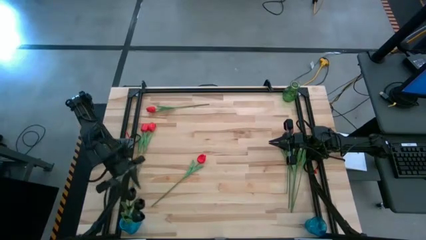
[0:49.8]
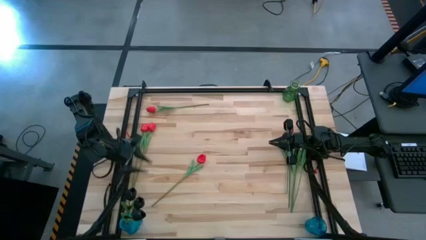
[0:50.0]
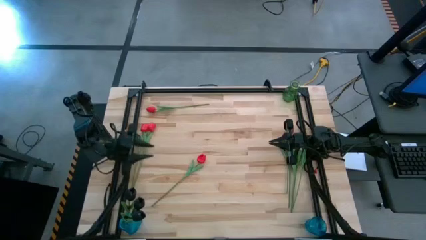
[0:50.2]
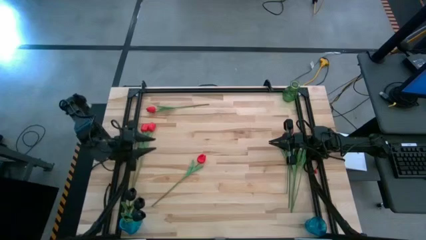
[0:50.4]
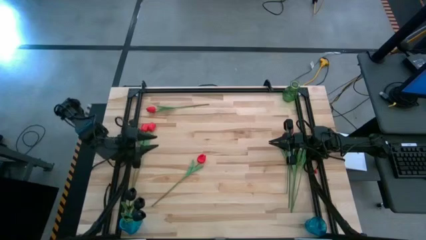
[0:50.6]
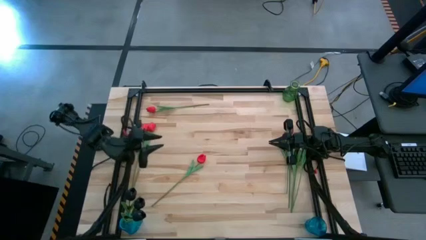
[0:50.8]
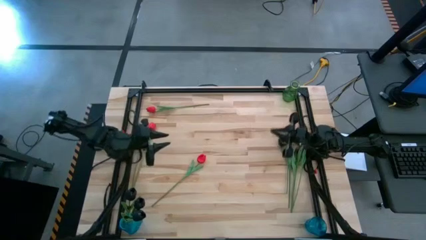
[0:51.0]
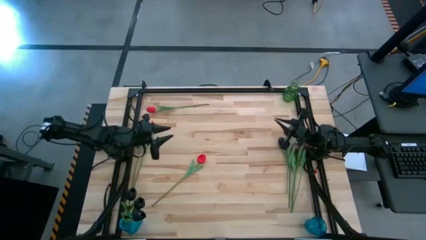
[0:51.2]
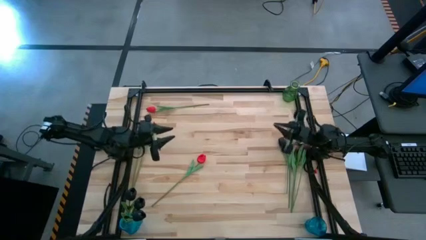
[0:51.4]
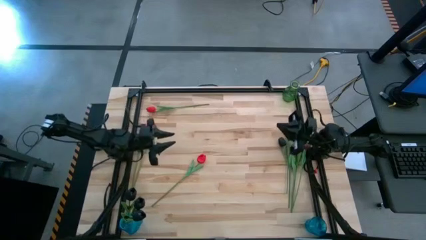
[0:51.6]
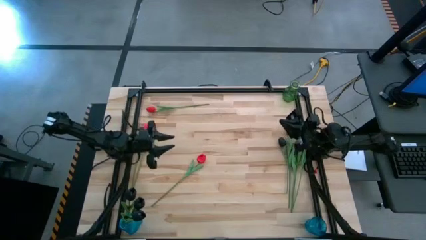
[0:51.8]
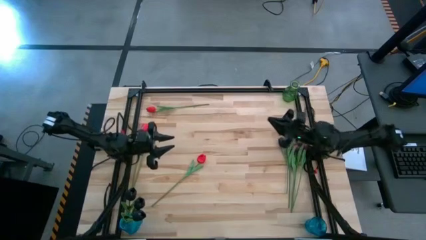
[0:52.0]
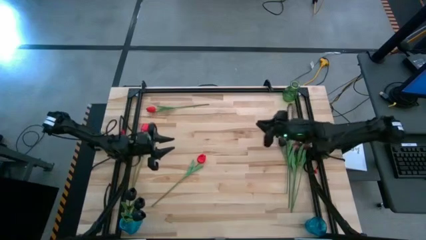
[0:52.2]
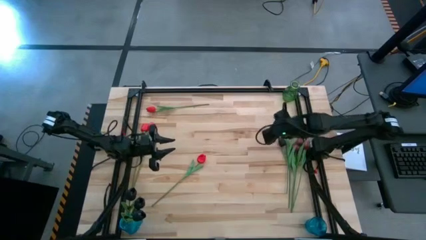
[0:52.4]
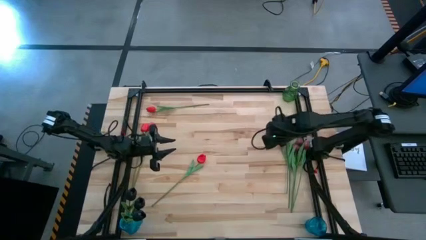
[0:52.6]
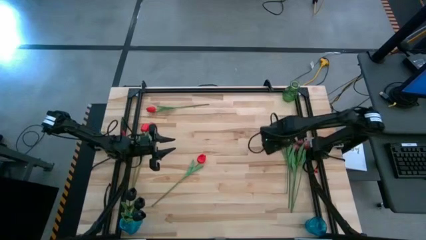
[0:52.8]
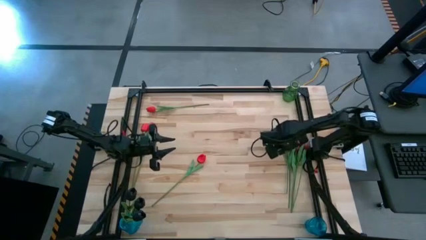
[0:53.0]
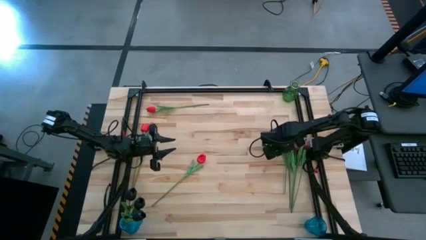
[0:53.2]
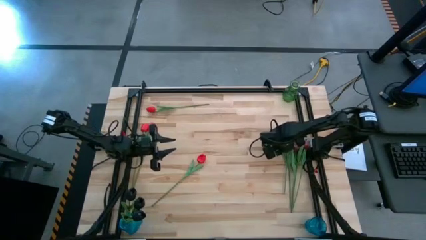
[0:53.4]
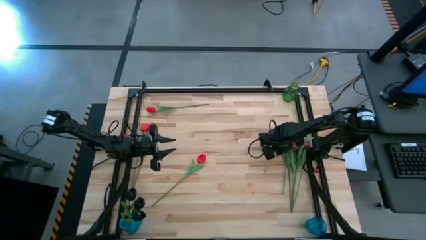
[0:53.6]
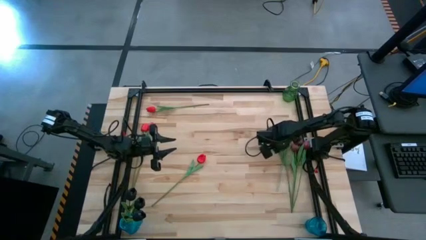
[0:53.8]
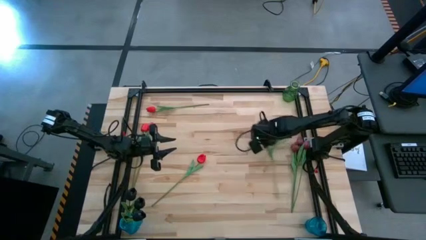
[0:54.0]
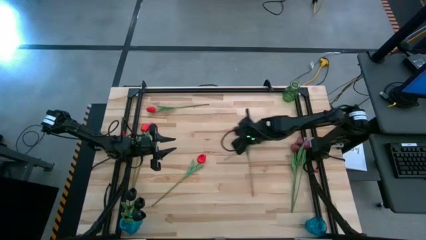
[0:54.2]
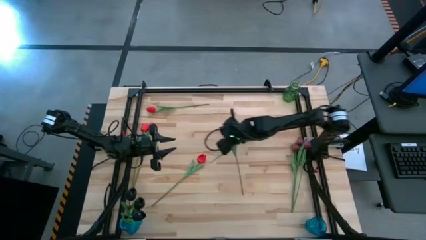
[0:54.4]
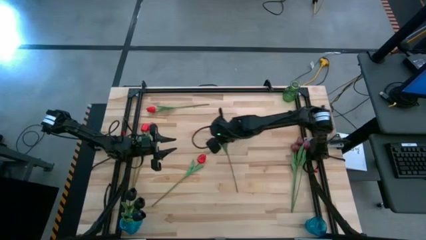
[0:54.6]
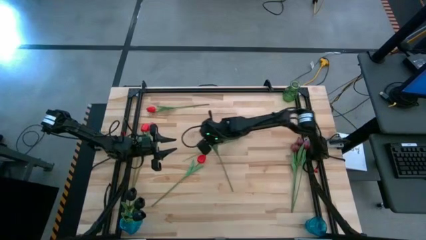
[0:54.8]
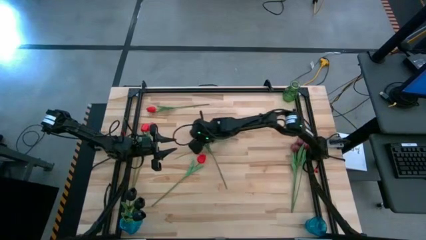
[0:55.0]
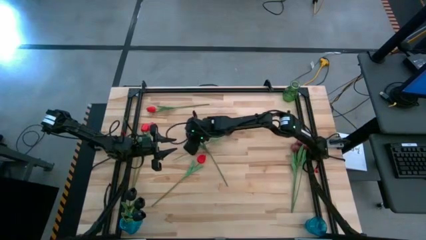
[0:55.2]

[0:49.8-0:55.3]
Task: Sort flowers into vase by color
Put the black tulip into the left blue vase

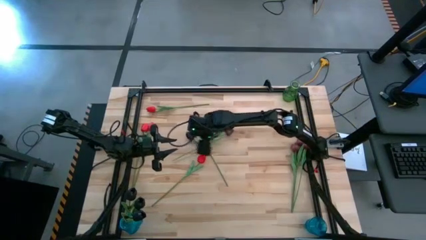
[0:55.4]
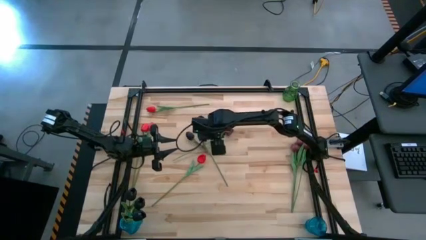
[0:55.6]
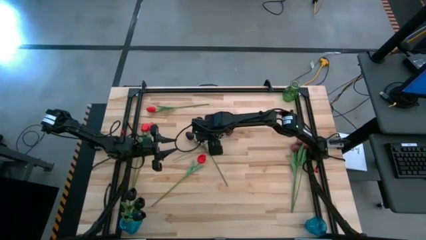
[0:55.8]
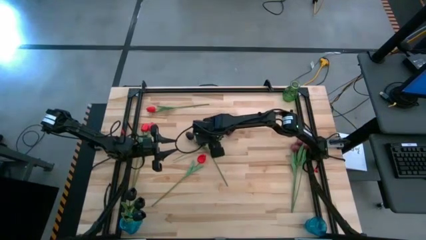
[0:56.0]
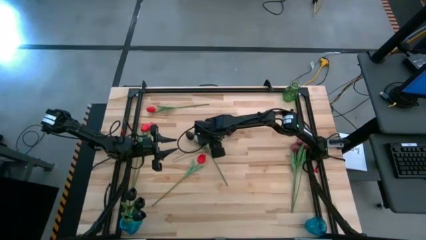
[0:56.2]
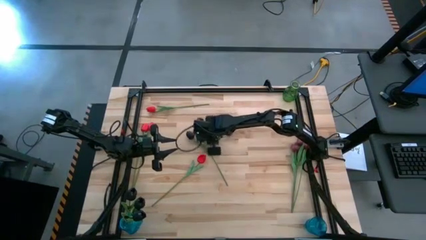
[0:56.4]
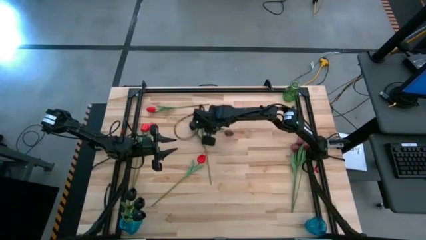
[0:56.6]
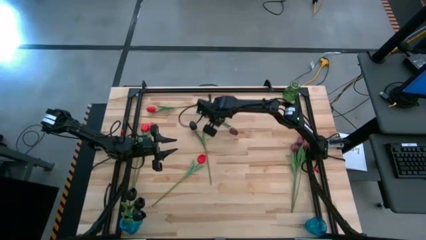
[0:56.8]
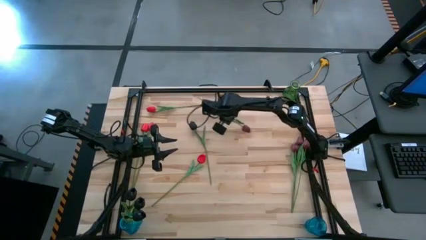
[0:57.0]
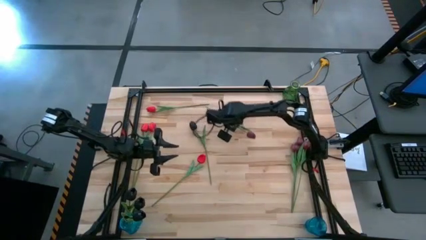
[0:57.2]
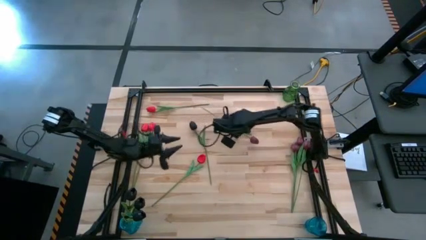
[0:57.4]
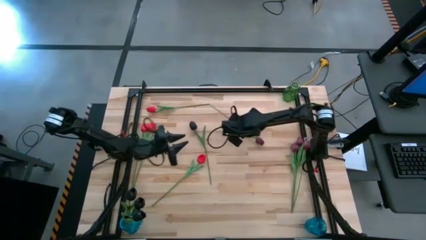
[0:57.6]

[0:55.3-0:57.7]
Move the dark red tulip to the center of the table

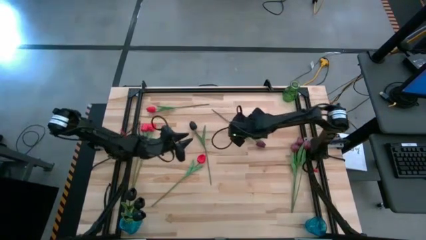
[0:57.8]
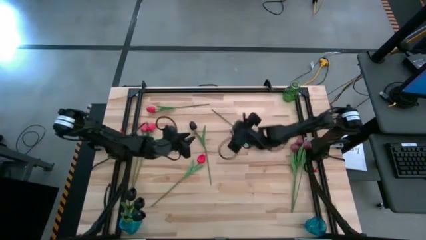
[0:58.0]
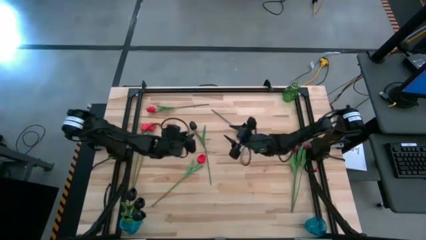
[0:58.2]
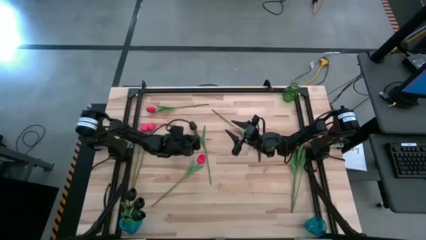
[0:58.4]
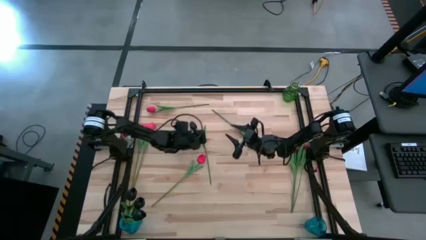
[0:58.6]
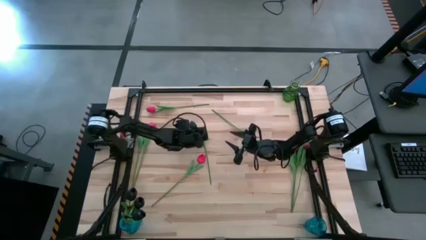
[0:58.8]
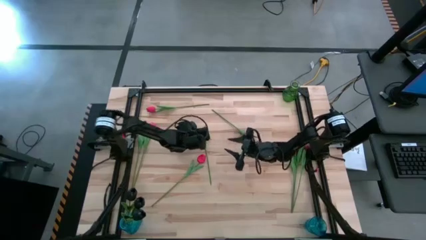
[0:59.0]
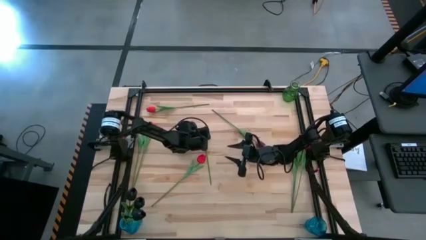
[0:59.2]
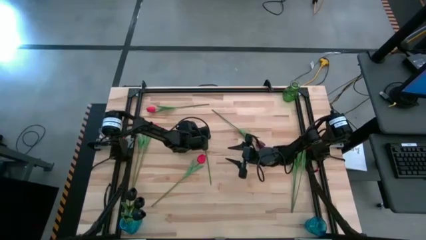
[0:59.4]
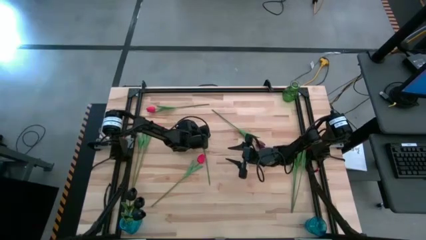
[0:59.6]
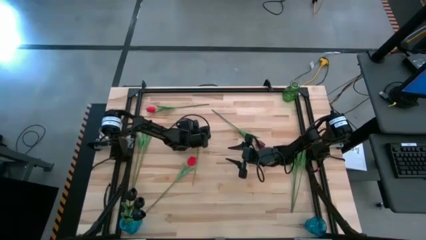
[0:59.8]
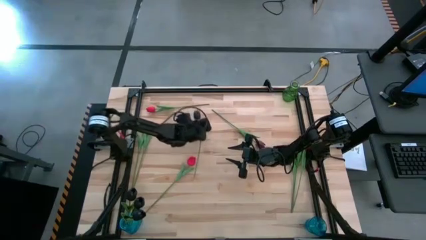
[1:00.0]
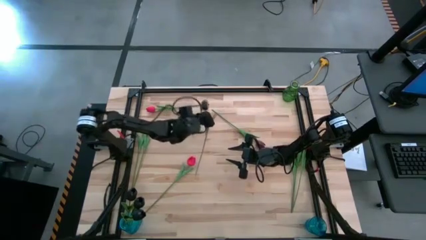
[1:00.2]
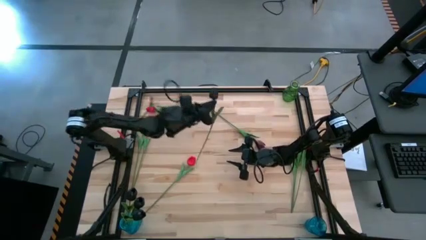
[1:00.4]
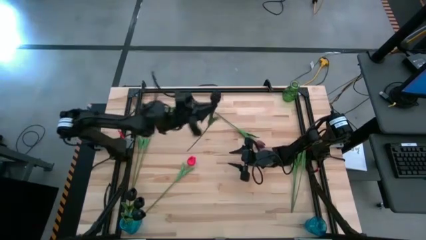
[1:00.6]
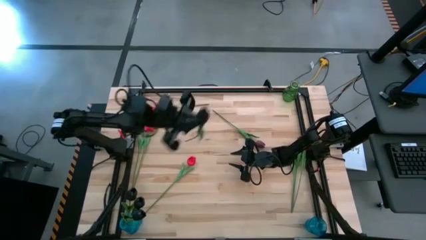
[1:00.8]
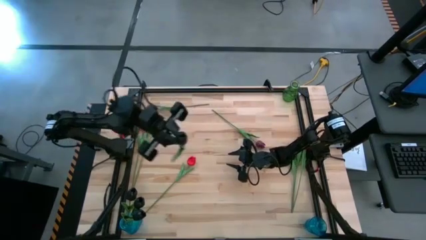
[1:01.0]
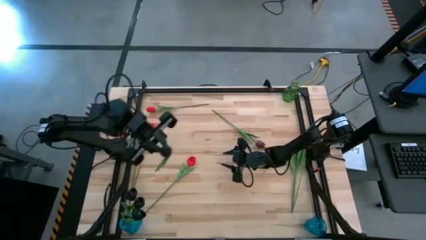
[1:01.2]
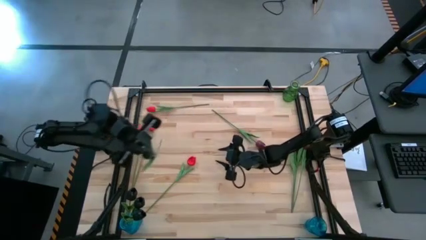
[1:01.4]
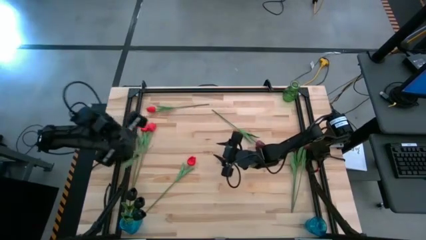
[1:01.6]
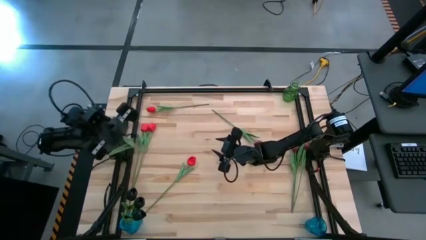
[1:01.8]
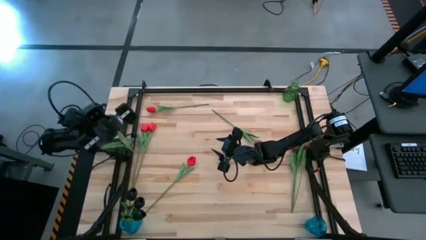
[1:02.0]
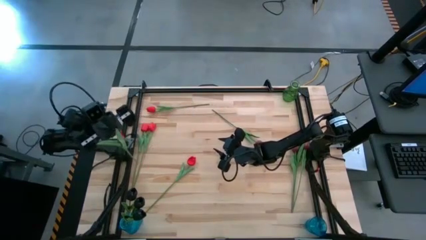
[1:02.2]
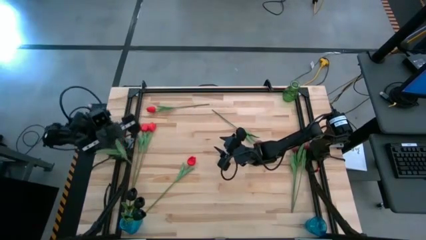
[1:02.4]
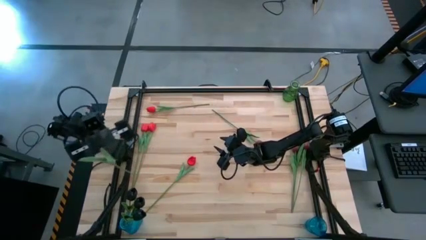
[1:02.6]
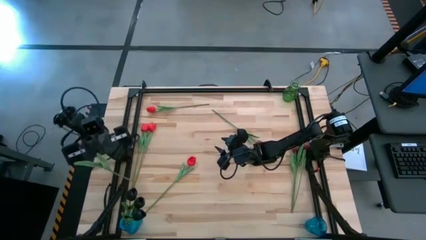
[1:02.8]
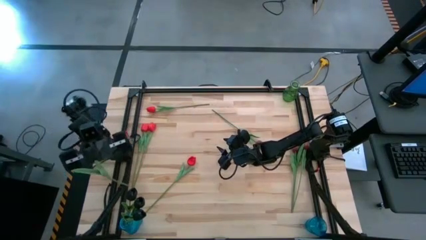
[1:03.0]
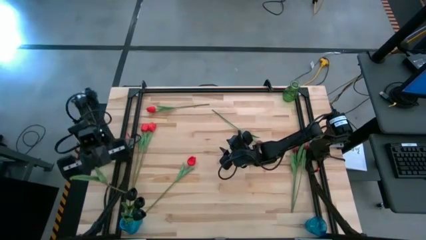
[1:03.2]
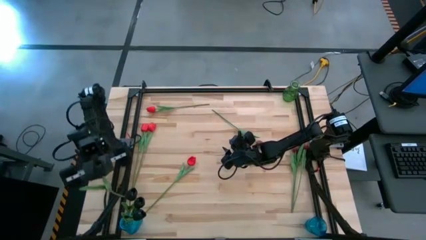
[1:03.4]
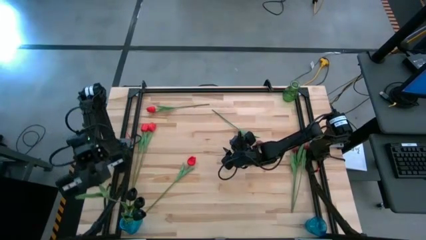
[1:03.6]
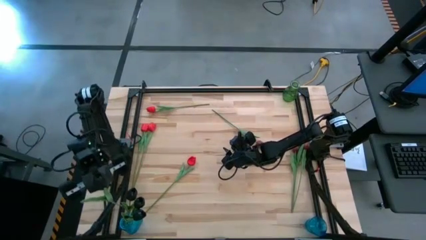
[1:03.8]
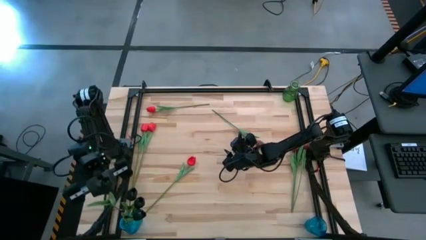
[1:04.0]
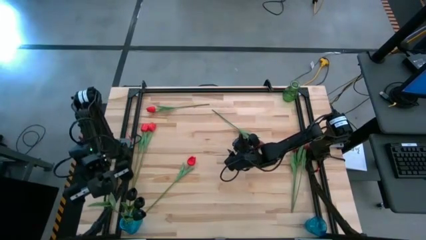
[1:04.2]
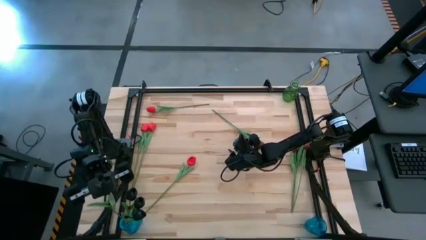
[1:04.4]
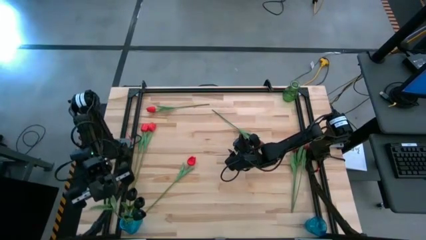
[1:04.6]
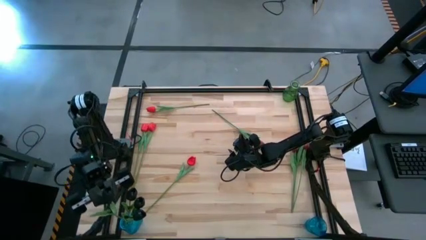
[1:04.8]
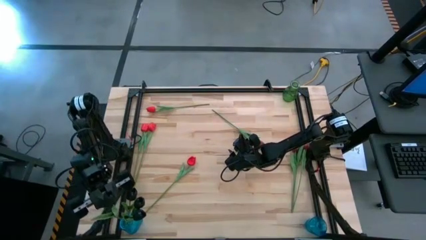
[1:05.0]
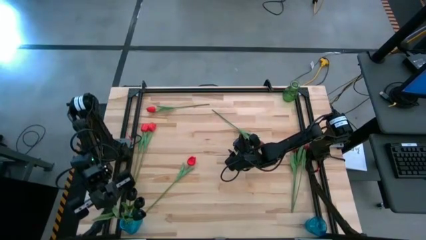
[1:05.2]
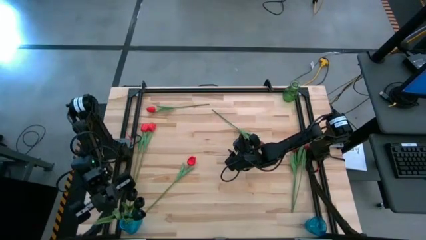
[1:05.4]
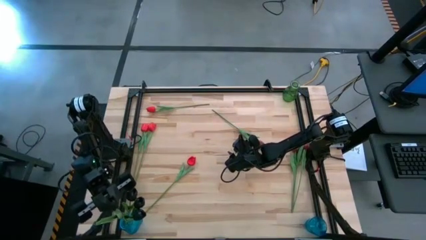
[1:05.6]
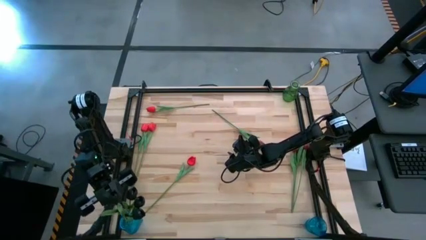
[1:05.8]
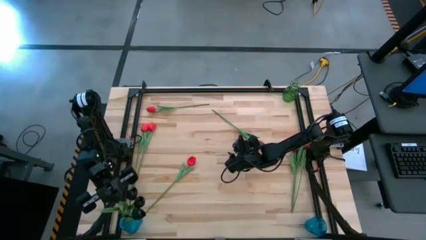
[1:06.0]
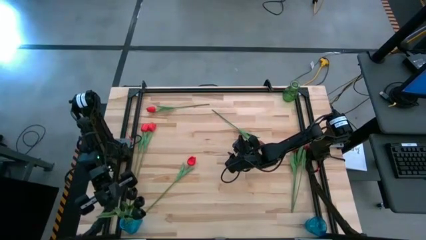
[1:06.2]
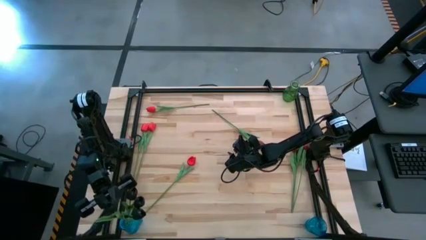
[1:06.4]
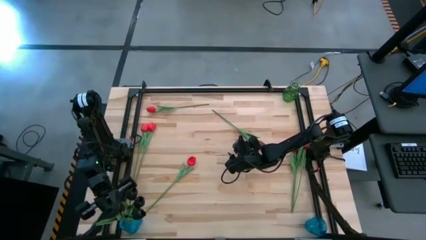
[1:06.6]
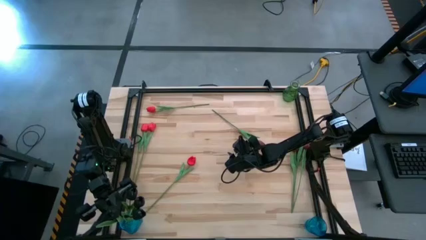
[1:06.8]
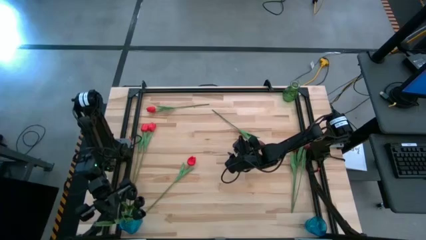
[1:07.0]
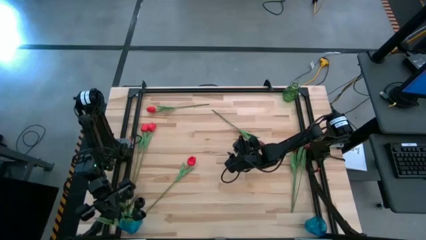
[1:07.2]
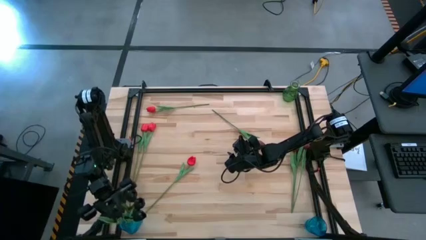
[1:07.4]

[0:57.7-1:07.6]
Put the black tulip into the left blue vase
